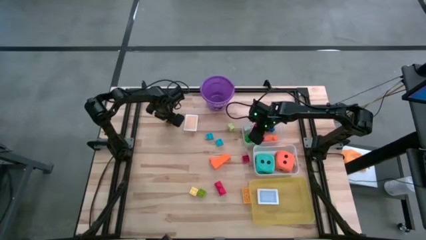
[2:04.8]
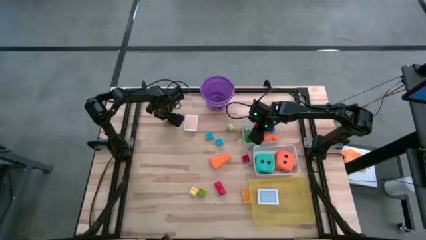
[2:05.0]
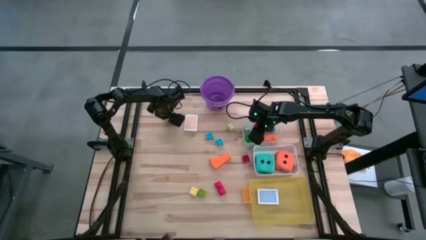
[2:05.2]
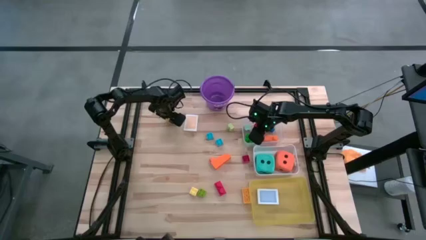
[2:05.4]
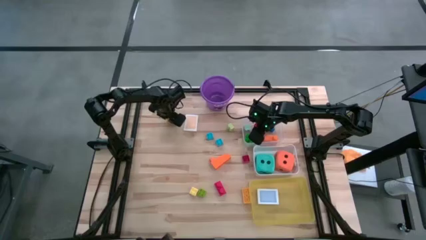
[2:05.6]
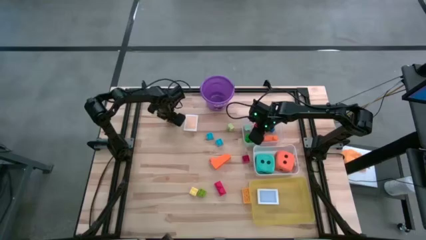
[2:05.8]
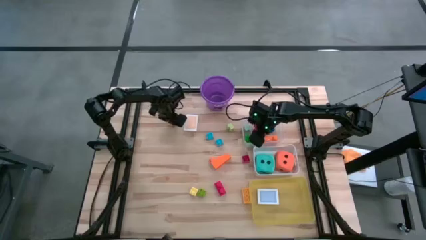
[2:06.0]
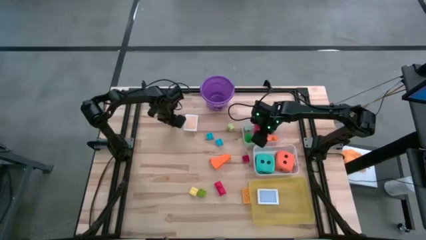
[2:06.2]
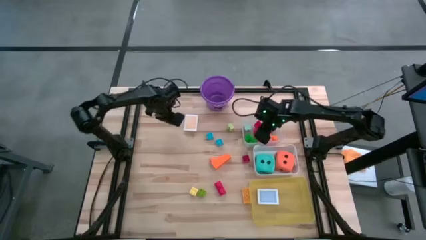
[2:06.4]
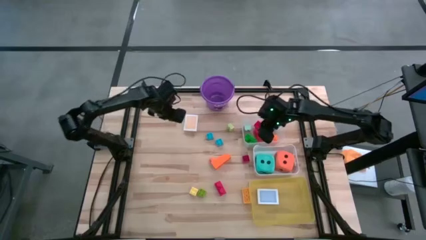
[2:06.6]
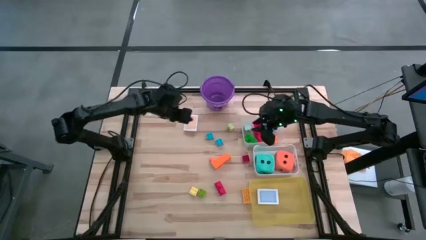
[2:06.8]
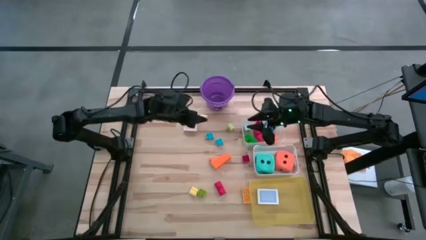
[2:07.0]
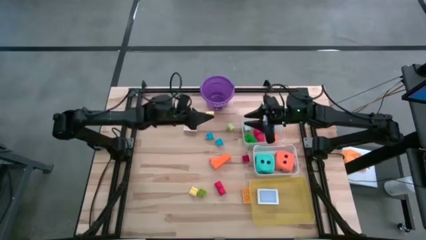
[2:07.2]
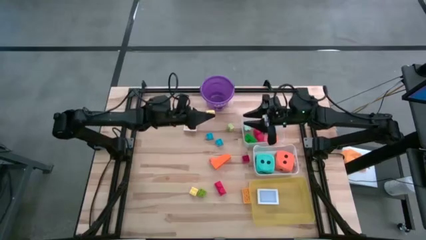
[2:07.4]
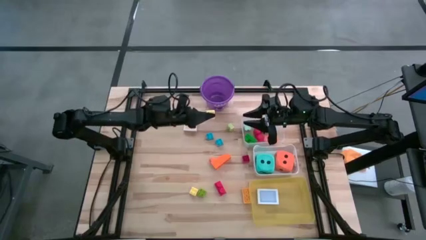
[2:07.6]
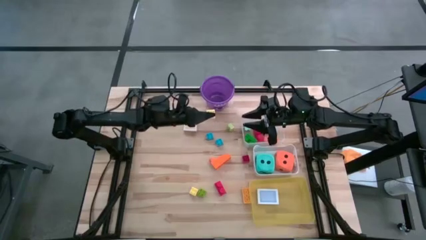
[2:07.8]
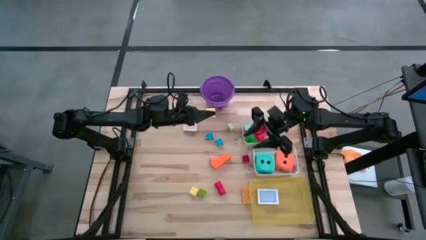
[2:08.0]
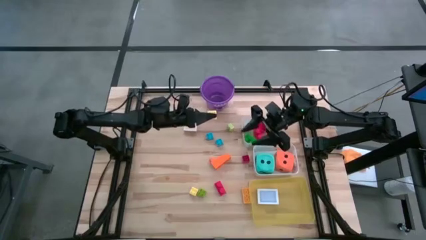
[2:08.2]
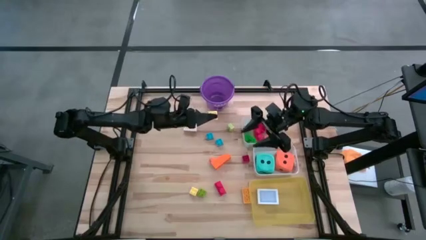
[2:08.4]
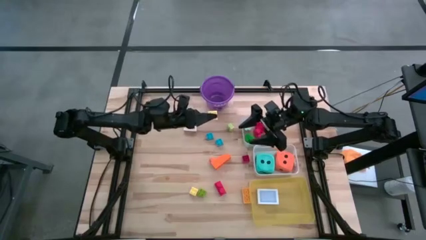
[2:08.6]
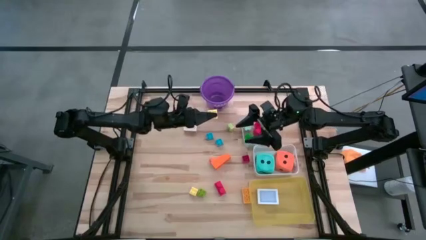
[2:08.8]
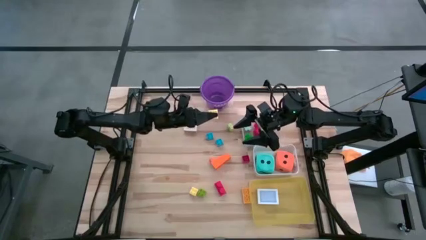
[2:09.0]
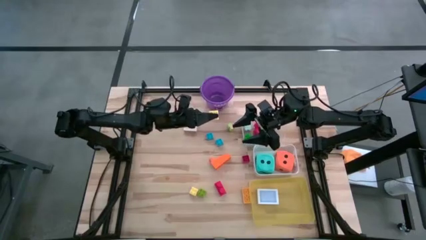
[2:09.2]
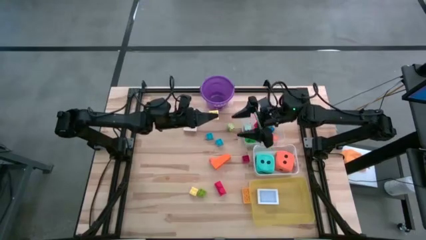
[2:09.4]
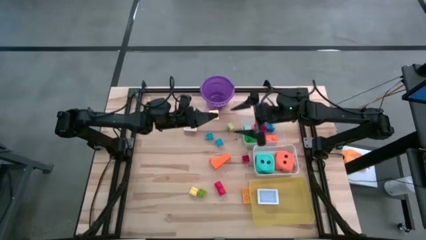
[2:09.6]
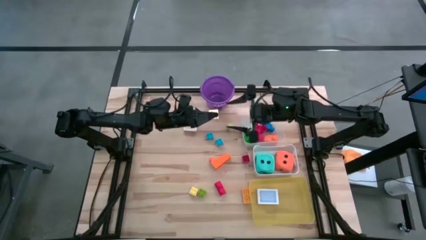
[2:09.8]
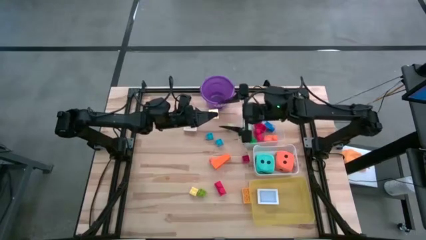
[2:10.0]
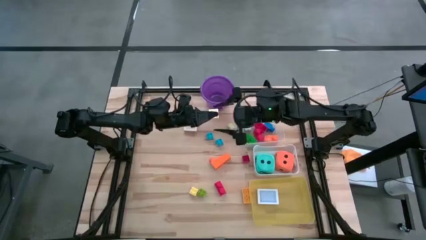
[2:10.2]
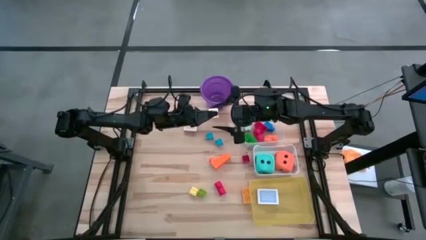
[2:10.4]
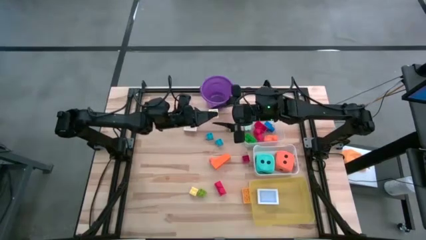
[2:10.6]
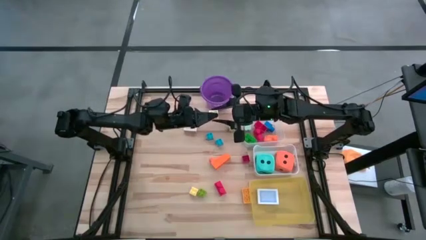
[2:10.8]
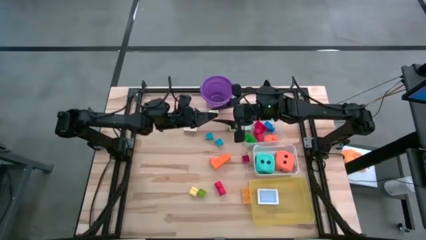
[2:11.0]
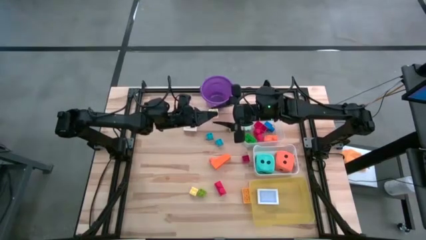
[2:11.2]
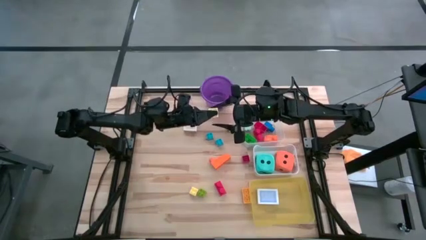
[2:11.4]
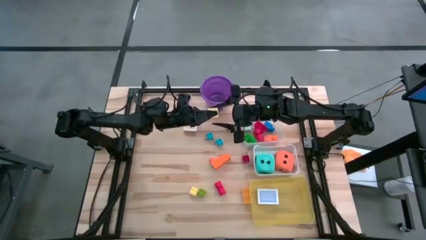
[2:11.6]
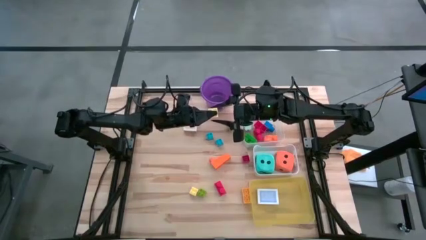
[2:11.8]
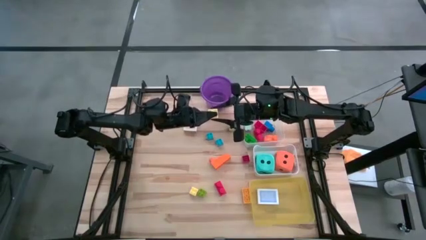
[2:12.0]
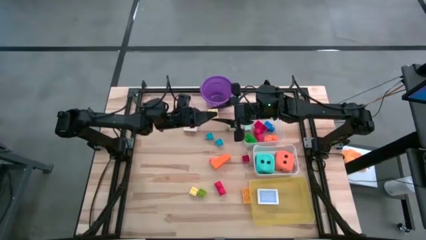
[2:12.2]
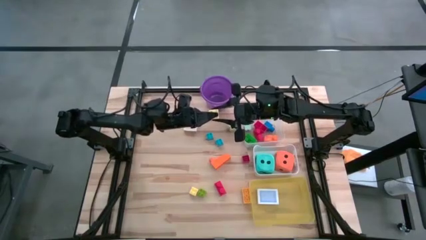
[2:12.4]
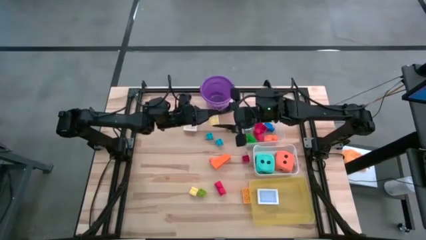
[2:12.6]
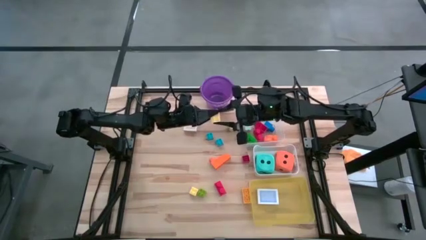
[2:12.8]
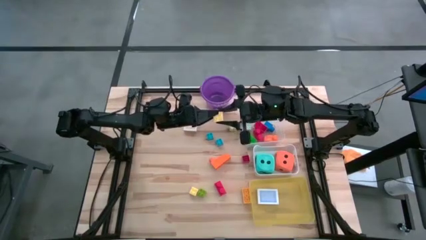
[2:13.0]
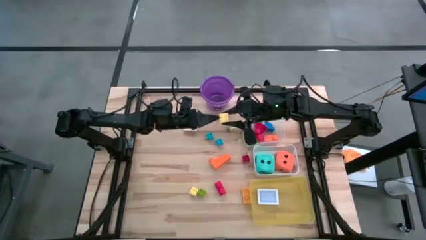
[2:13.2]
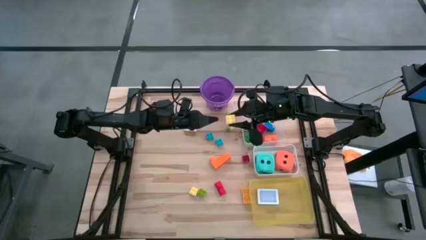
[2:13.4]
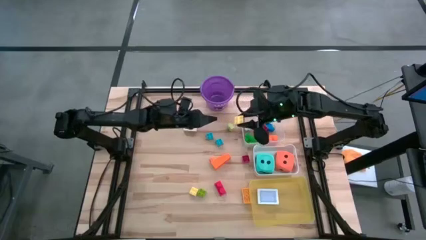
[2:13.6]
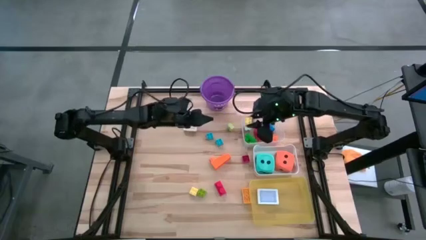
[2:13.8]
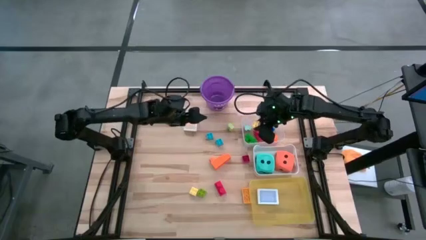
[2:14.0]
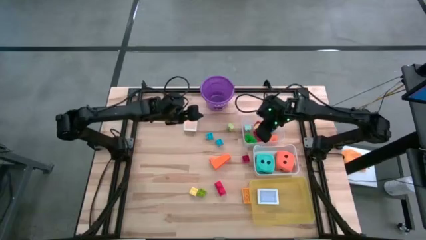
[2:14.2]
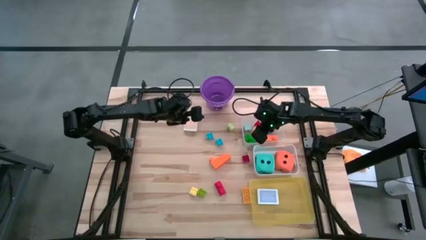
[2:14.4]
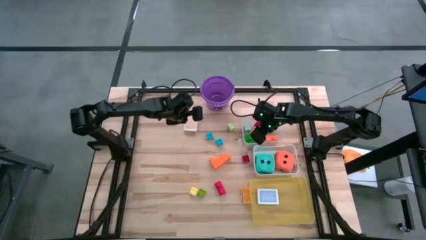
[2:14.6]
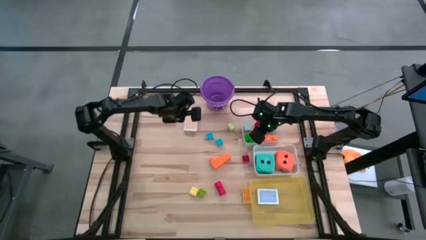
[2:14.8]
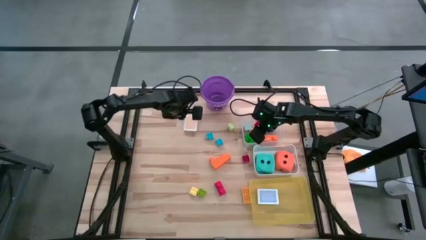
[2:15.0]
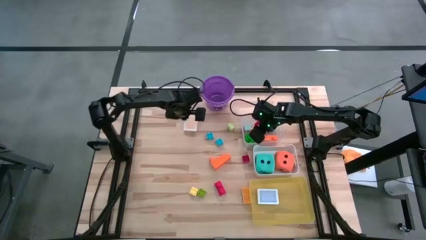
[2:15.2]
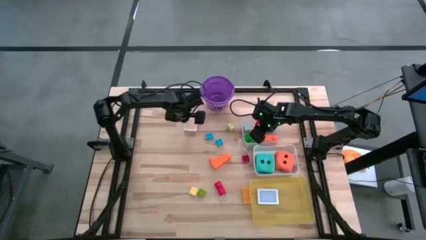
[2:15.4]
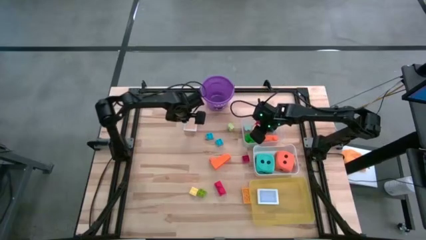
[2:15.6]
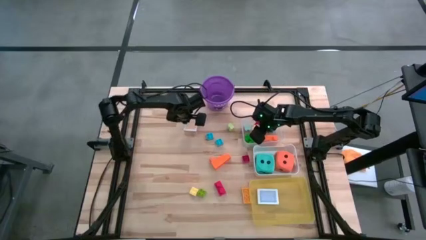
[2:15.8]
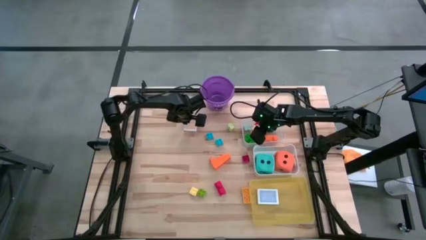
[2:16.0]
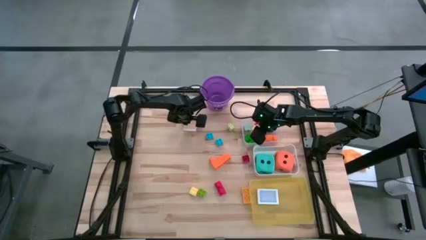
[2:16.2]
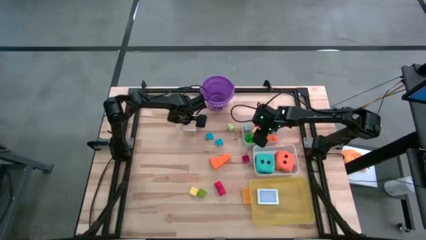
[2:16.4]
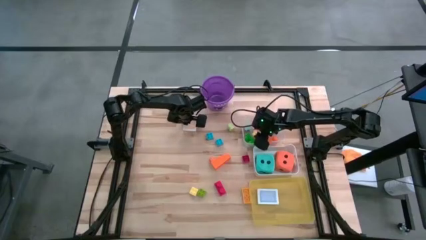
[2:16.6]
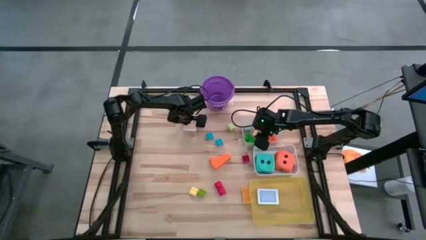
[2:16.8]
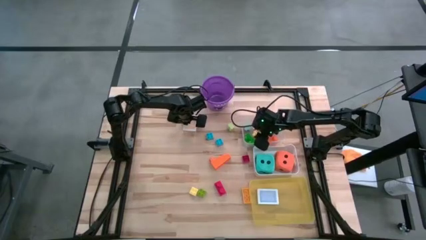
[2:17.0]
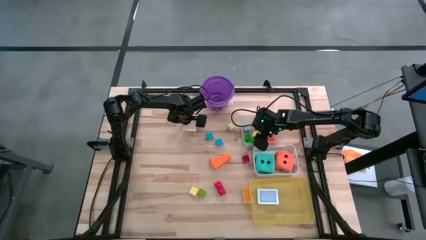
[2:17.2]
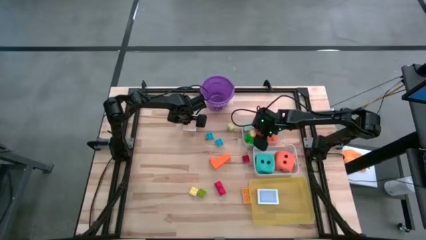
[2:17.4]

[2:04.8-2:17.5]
Task: Pick & Place Toys
Put the light yellow game piece into the transparent bin

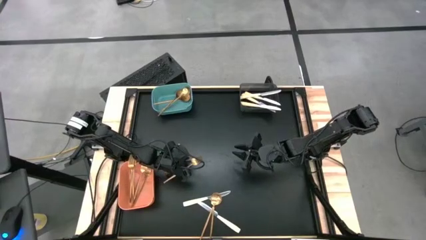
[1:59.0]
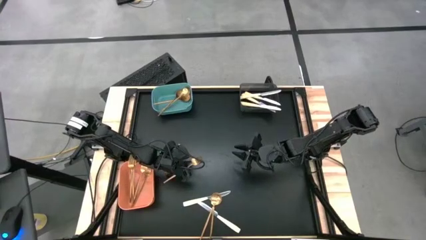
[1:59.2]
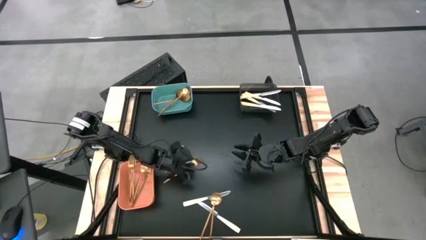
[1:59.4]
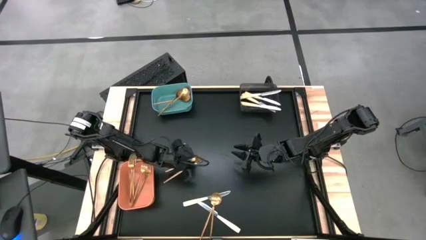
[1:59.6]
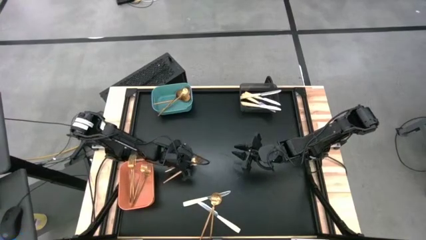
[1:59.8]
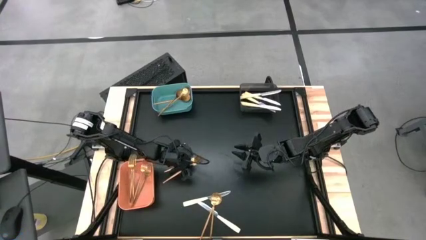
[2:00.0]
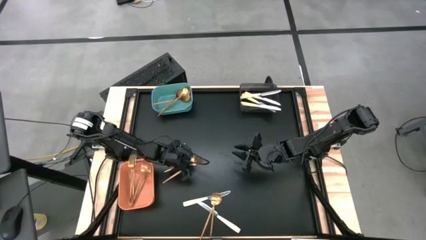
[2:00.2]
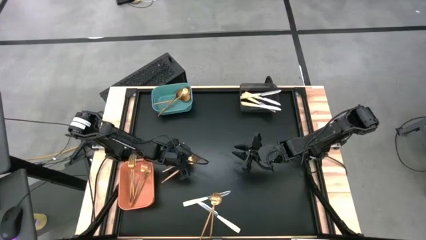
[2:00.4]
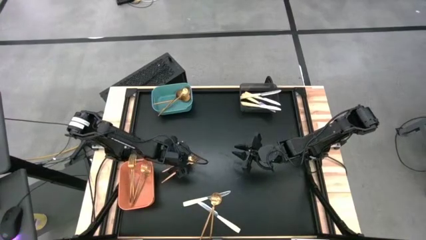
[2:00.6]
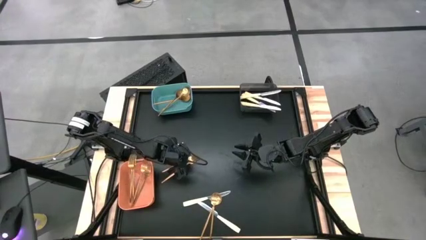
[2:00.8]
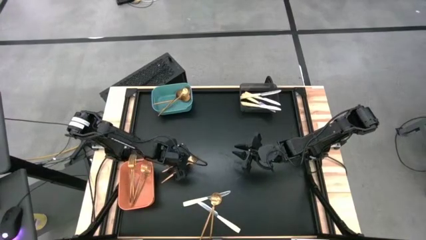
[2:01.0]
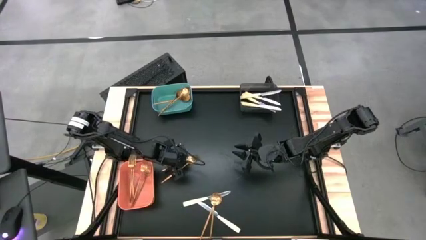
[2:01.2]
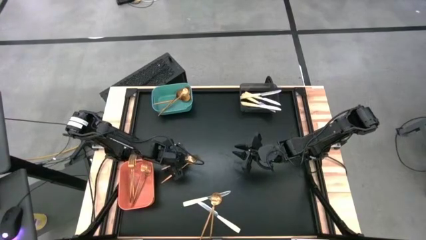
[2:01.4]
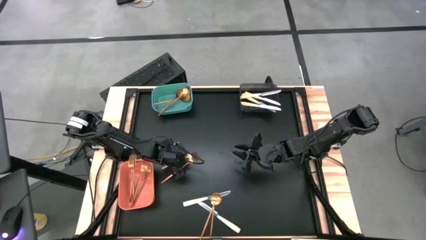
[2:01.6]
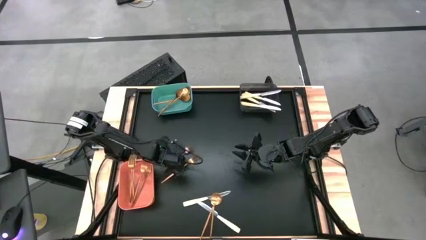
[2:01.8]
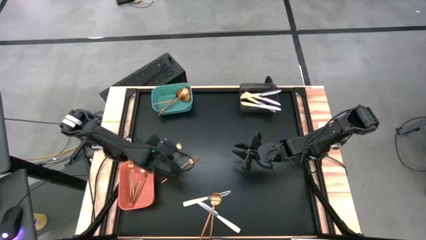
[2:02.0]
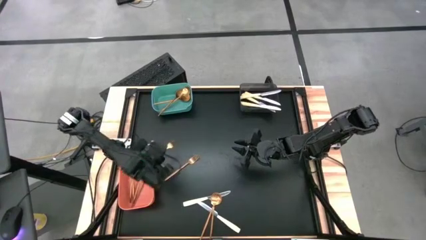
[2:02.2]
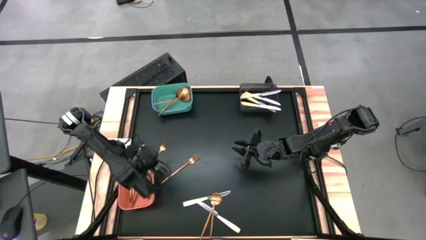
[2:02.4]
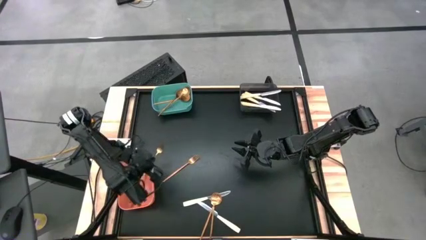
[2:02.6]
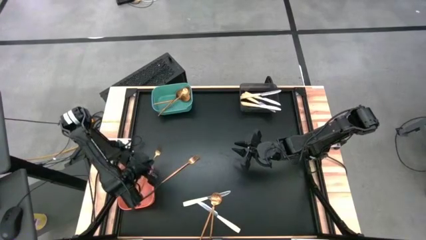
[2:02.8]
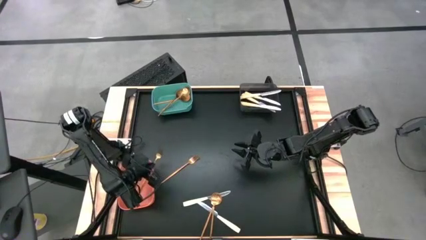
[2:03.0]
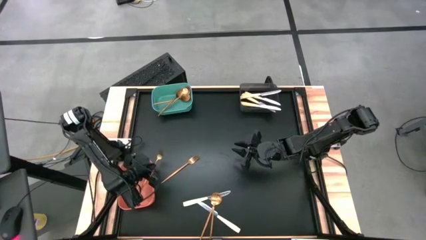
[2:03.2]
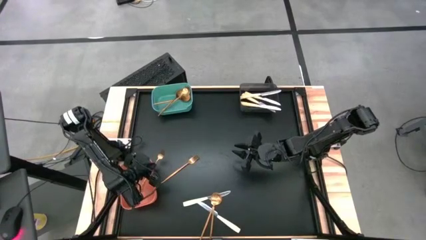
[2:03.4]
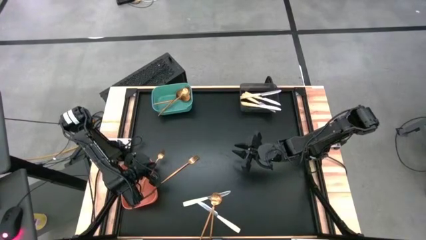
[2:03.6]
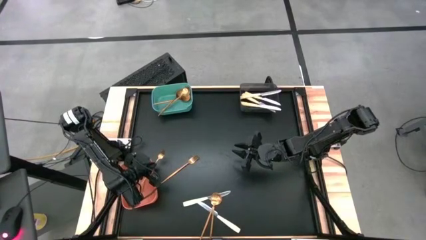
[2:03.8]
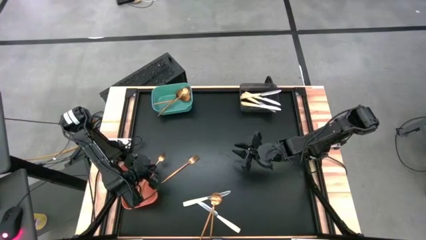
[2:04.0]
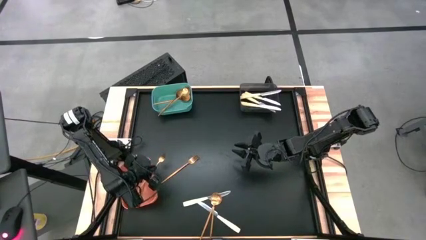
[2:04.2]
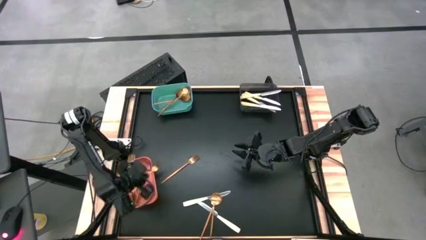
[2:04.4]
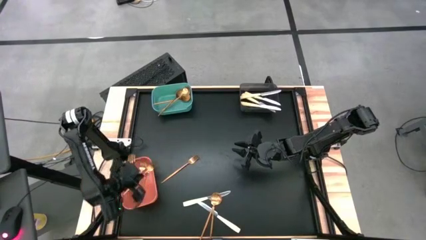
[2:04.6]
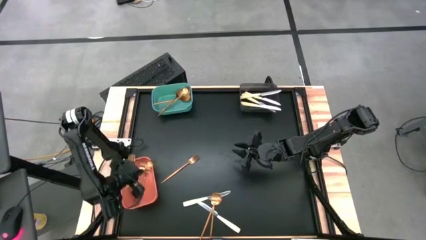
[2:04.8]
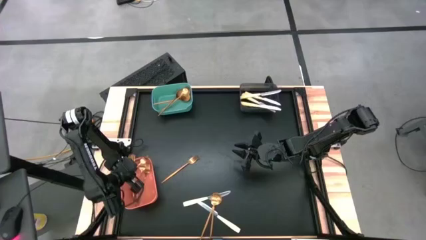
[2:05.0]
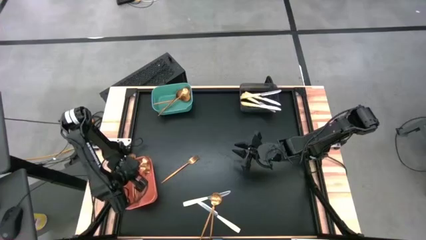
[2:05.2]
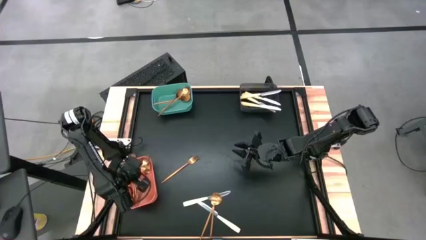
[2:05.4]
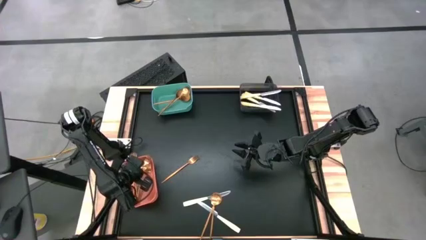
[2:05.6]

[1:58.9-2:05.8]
Task: Sort silverware by color (type)
Put the gold fork into the orange bin
